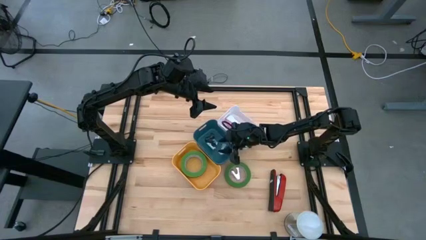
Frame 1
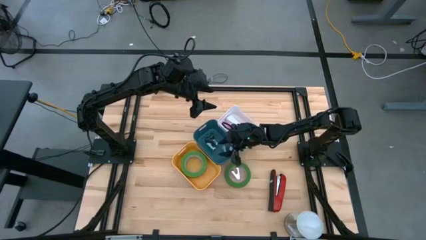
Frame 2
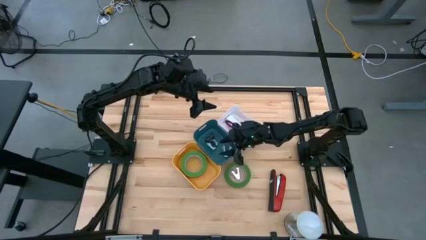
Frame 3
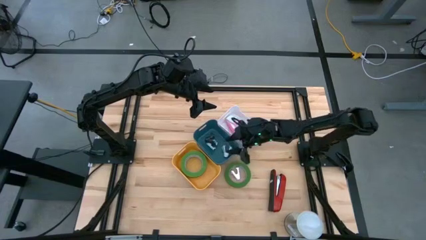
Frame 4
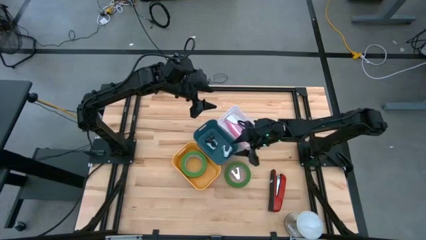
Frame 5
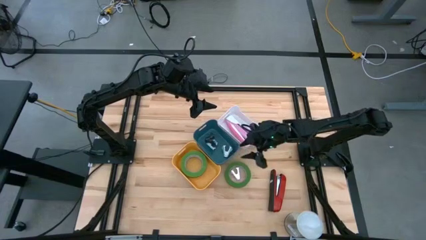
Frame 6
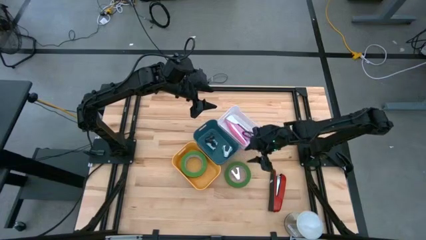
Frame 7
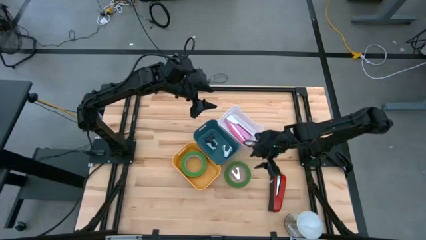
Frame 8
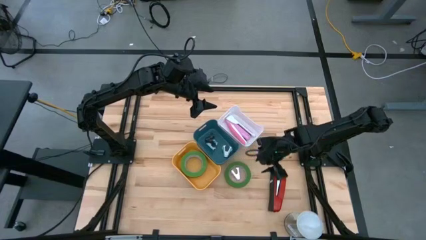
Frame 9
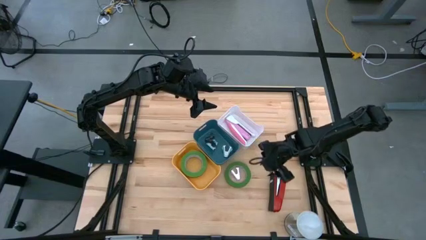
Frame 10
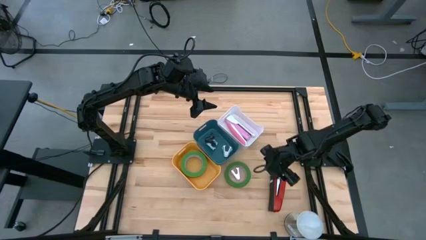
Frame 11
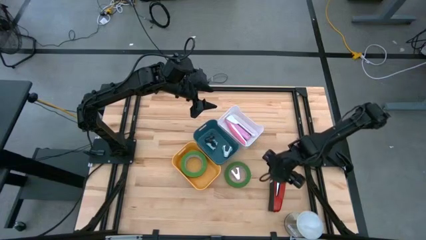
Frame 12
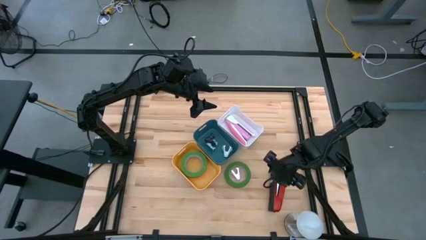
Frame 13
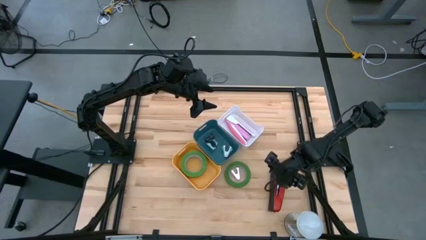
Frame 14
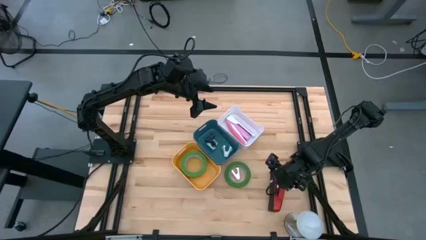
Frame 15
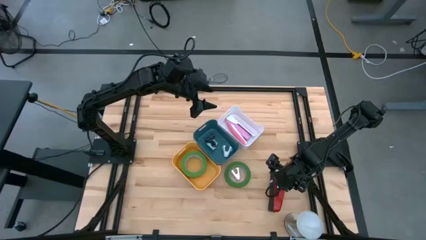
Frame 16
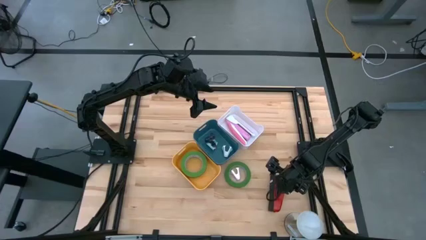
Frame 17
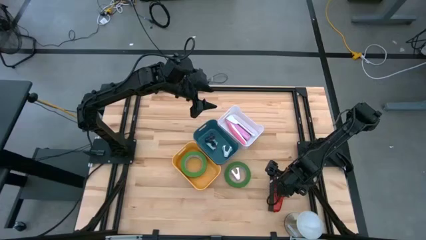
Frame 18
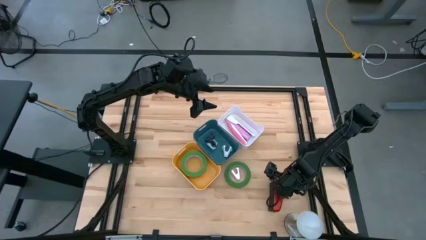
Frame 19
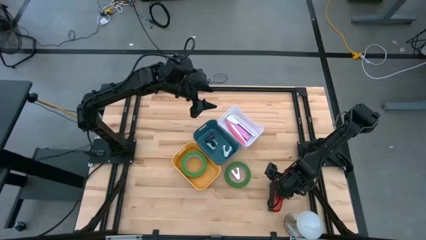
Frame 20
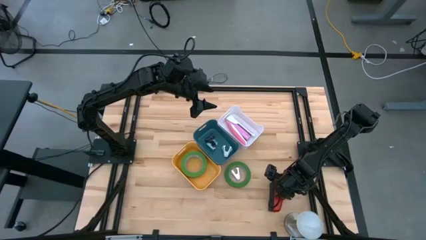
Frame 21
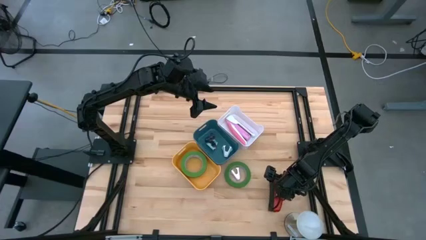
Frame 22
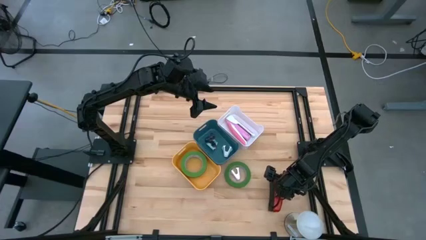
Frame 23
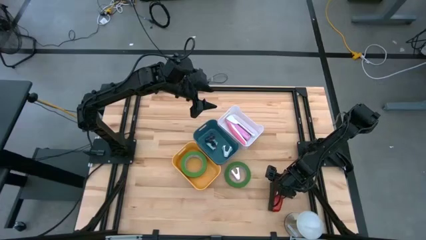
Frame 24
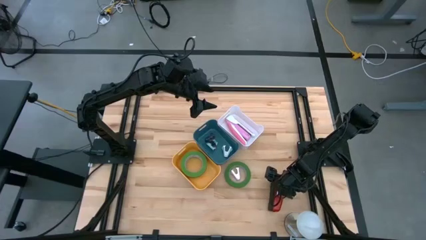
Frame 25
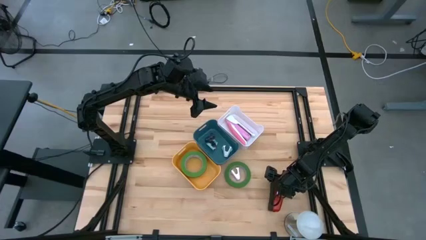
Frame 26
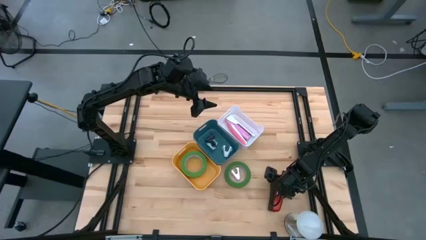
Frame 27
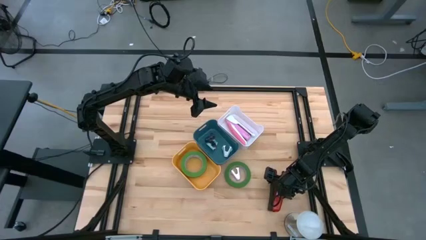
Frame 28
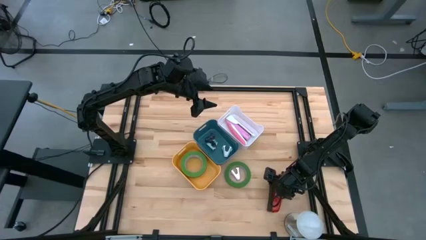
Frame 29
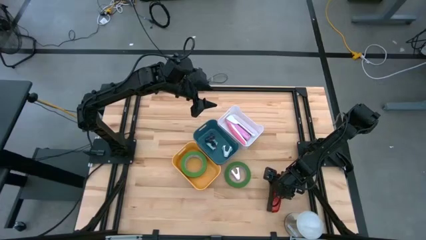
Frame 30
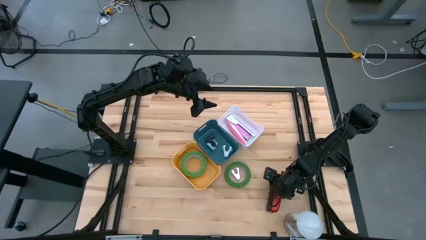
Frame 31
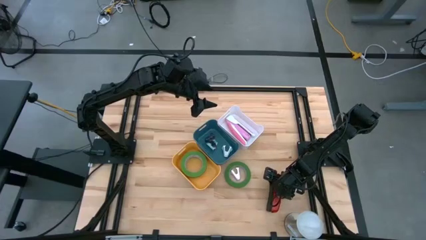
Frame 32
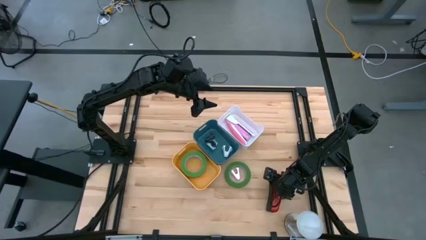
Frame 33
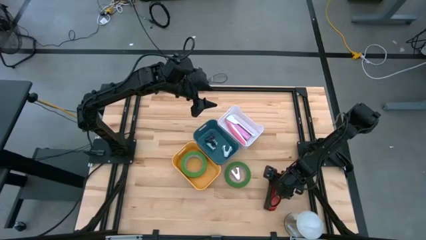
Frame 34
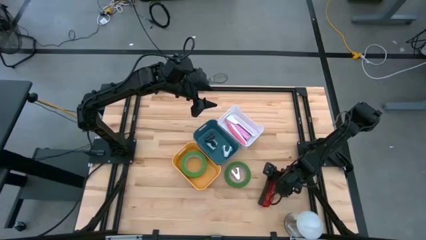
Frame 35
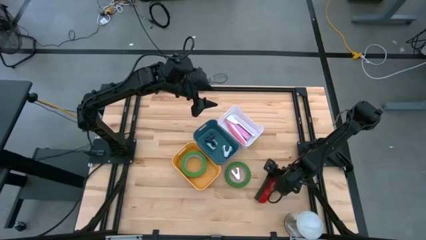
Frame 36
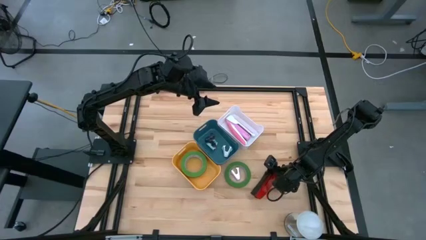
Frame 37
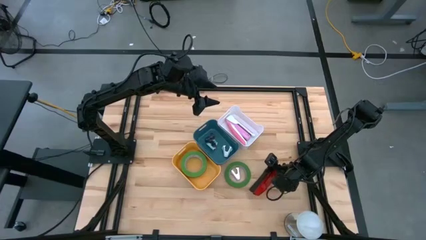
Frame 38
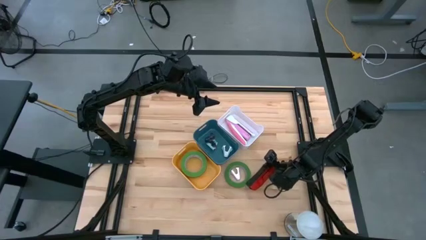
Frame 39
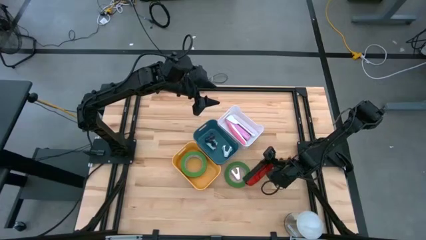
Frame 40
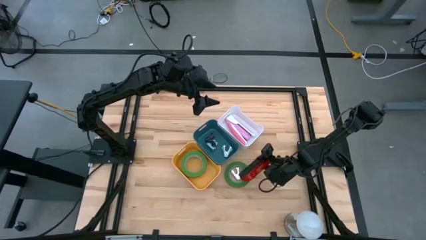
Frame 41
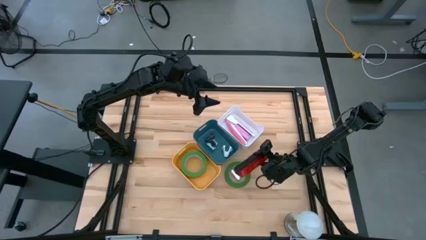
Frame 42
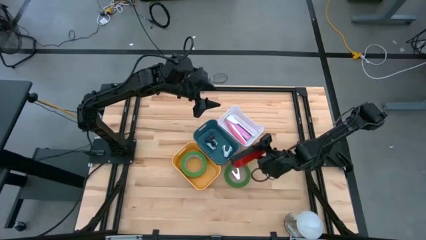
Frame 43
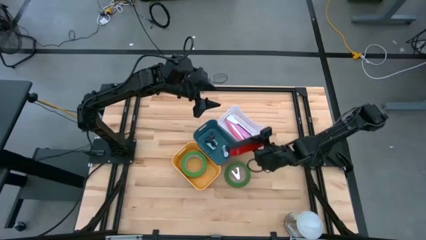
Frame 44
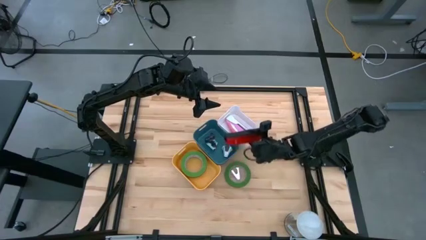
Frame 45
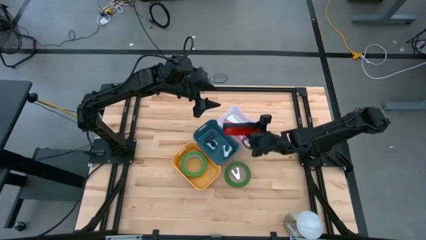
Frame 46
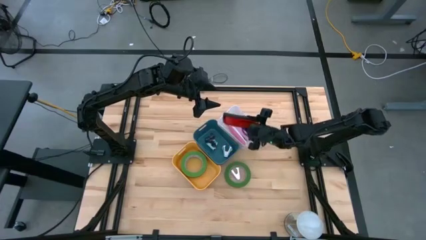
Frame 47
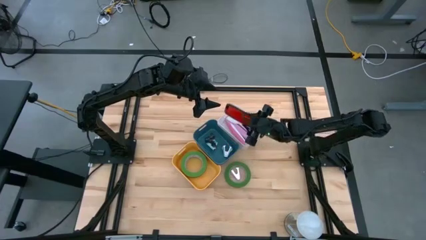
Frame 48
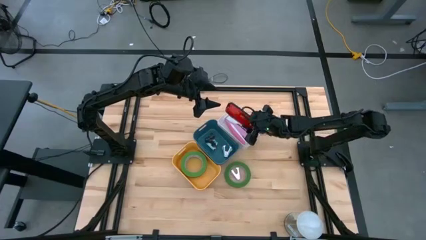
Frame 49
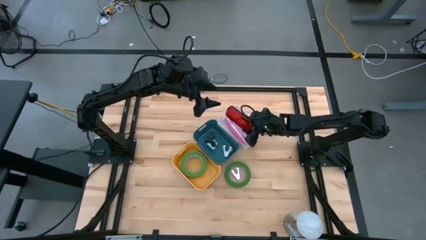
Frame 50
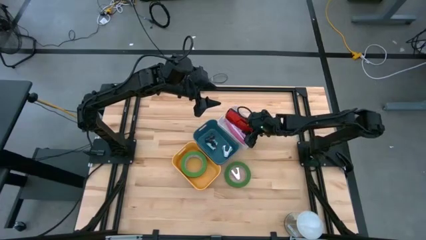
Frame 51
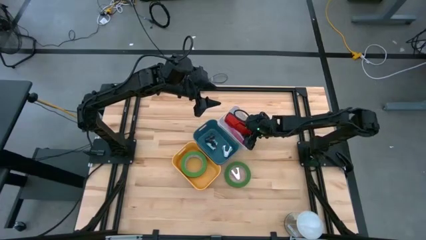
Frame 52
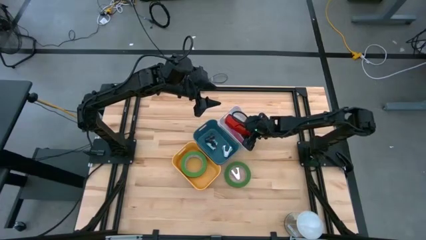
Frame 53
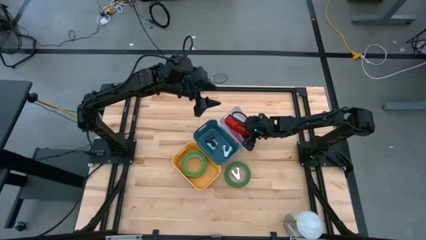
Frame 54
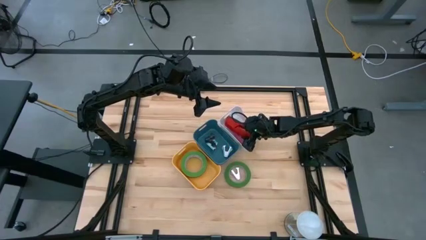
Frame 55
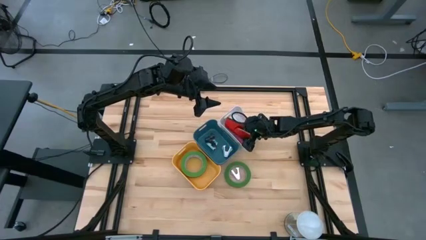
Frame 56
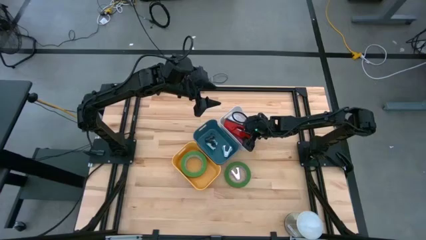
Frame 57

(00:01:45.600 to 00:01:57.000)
Task: Pick and place Stapler, Stapler remover, tape
Put the red stapler into the white bin

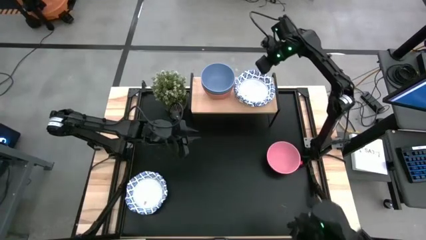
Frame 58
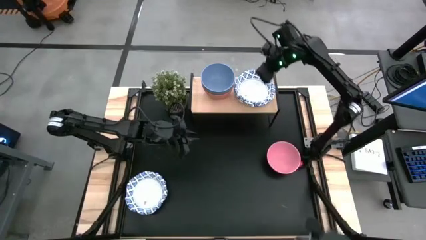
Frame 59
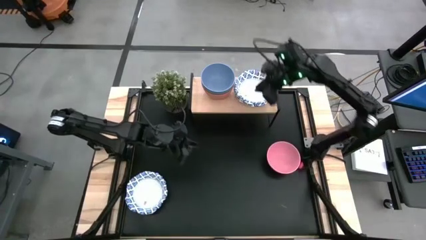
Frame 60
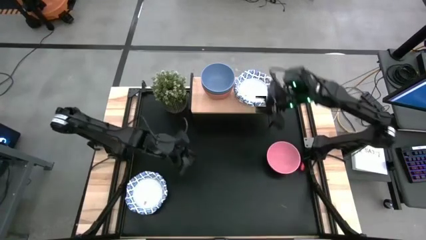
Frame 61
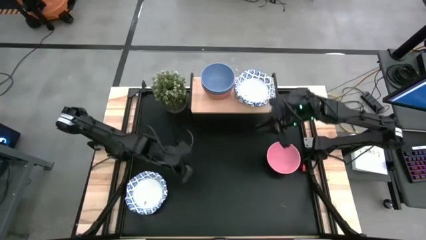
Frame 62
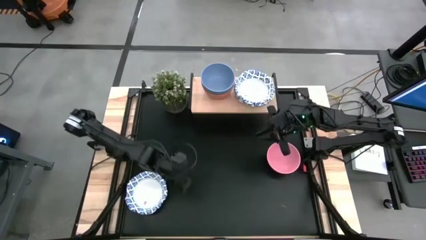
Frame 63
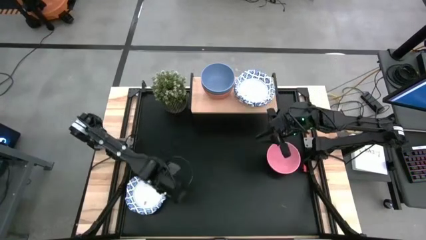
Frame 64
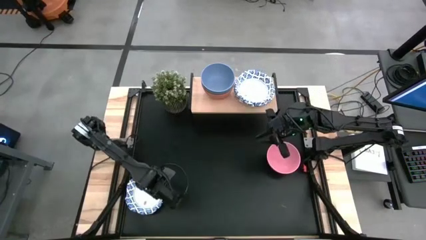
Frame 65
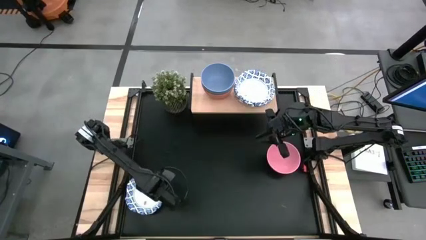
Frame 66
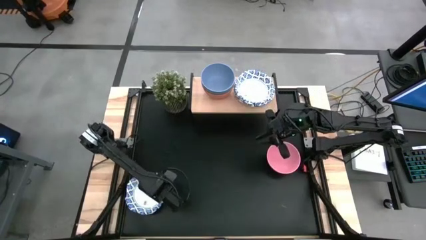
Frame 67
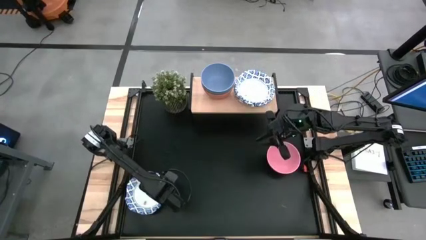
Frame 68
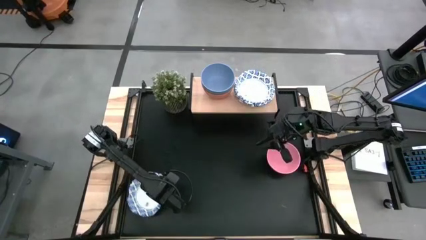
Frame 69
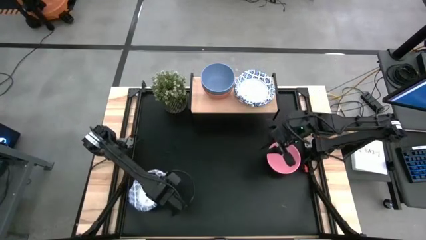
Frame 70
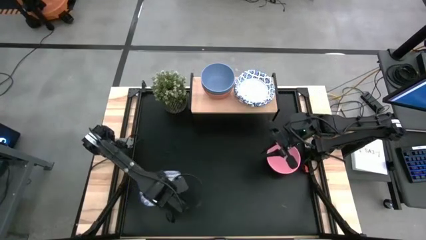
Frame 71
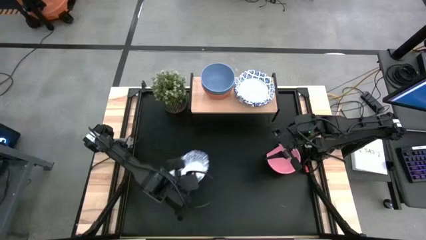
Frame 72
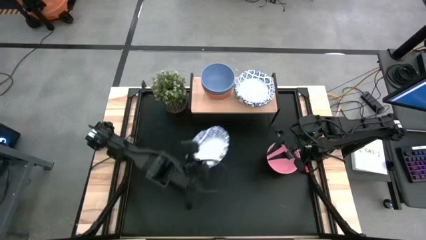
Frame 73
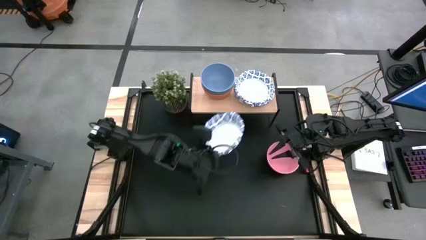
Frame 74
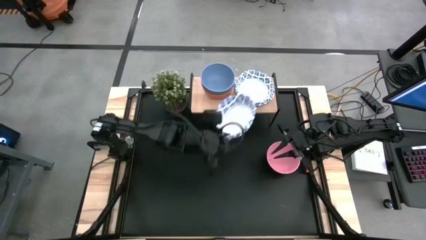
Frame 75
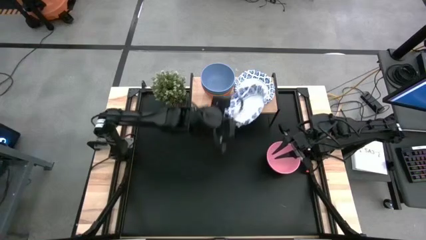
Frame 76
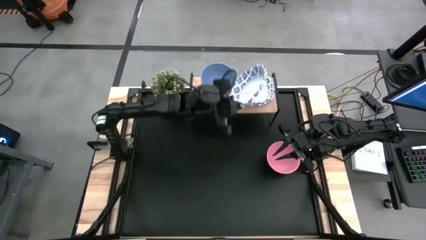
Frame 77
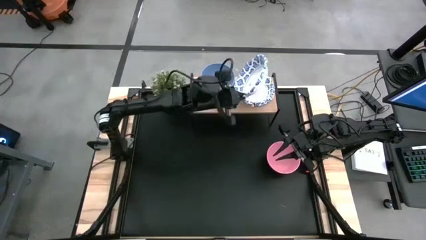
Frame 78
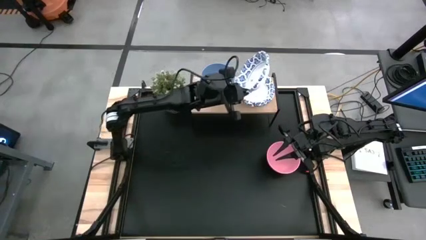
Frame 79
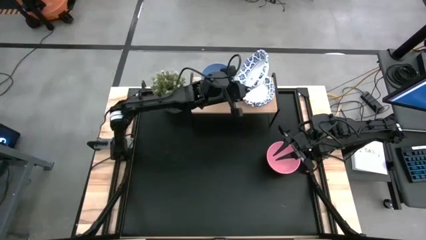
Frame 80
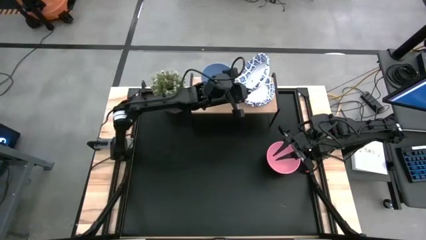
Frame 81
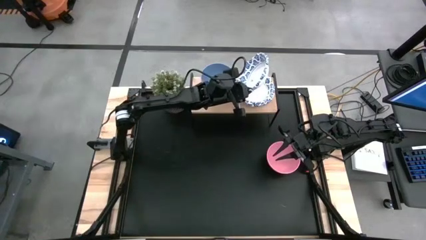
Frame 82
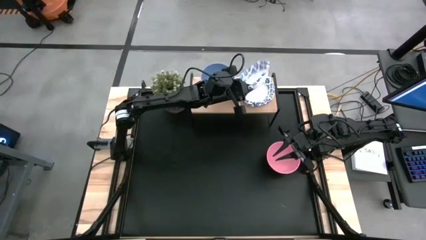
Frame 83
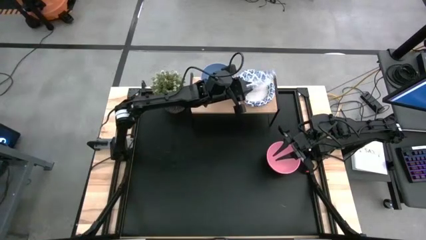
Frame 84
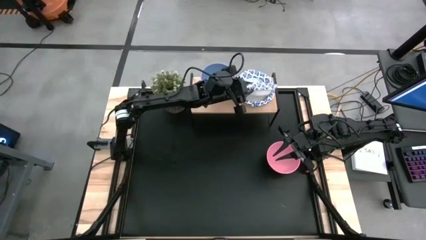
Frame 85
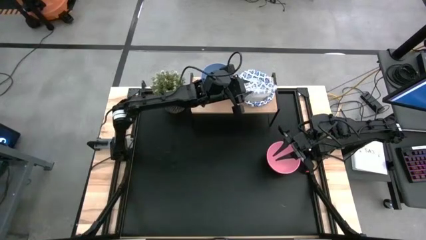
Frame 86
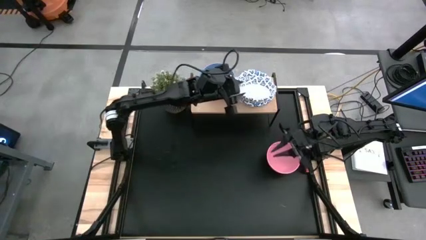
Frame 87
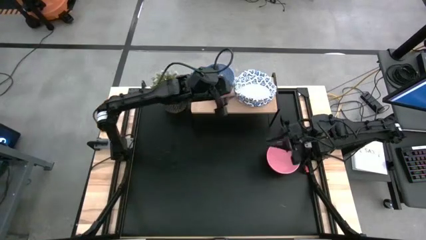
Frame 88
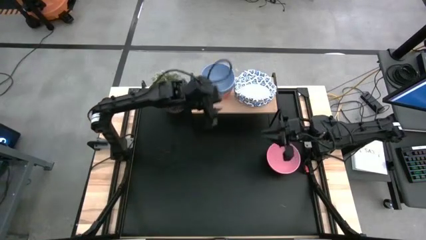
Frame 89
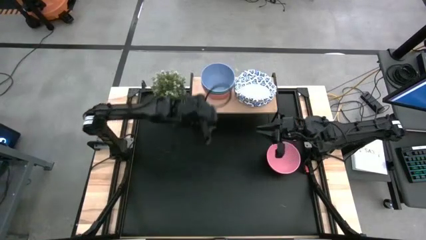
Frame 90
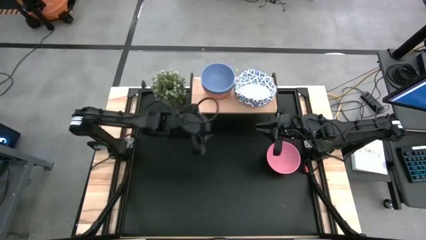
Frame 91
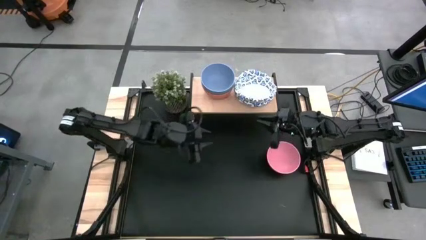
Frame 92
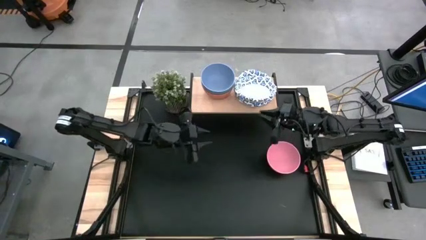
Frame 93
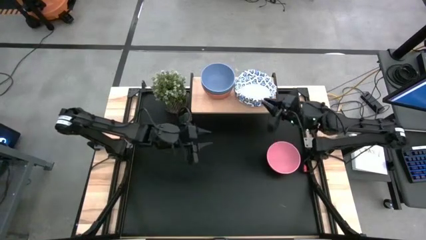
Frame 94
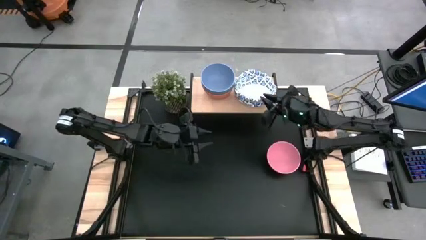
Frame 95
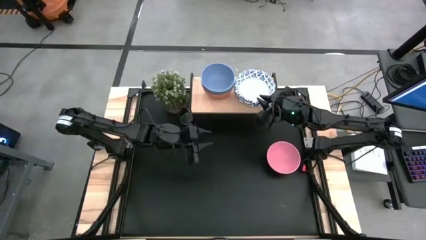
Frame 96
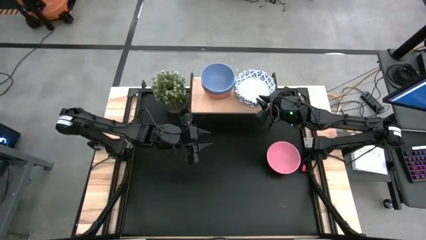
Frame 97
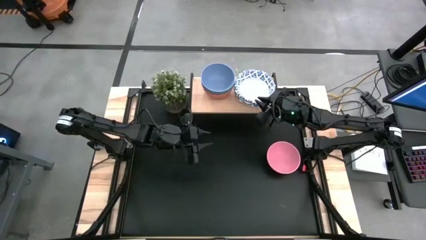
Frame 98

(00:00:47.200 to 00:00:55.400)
Task: Place and stack bowls onto a shelf
Stack the white patterned bowl on top of the white patterned bowl on the shelf
